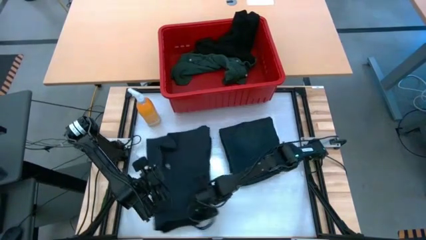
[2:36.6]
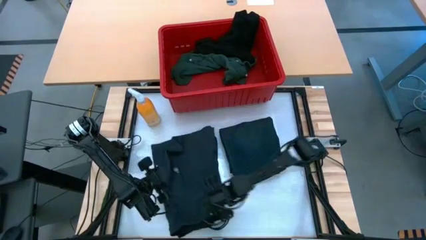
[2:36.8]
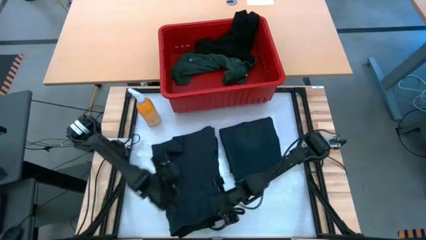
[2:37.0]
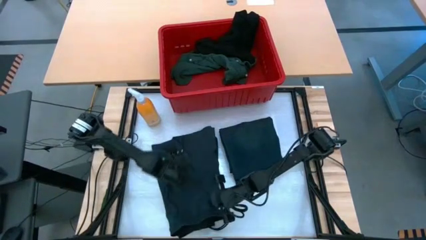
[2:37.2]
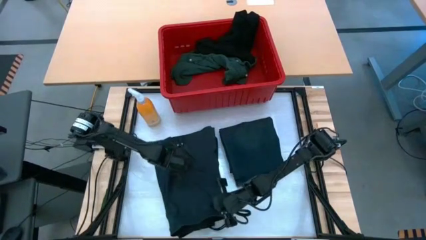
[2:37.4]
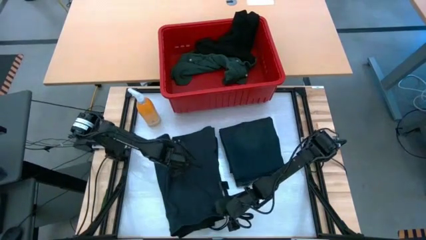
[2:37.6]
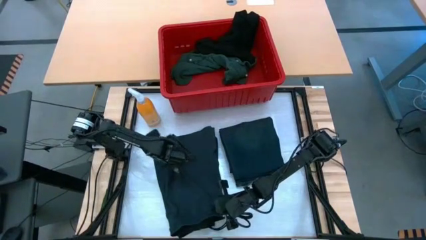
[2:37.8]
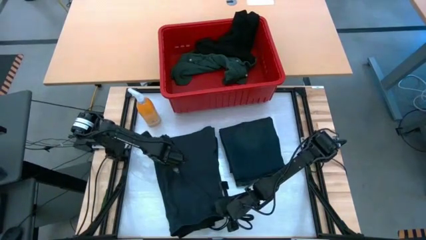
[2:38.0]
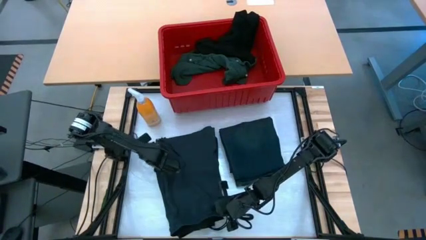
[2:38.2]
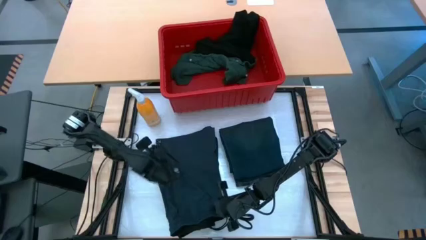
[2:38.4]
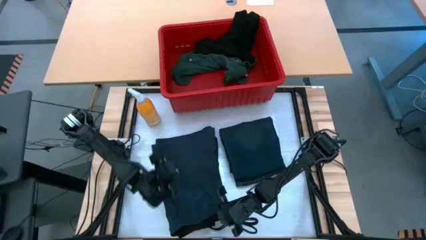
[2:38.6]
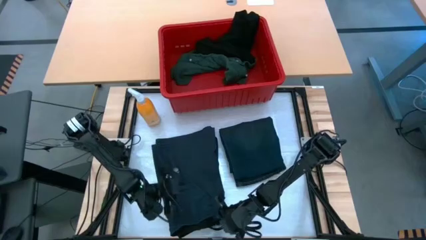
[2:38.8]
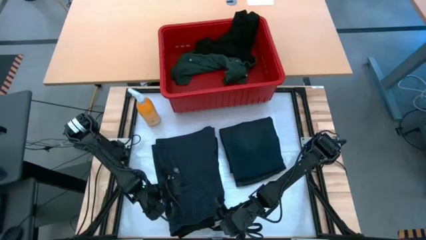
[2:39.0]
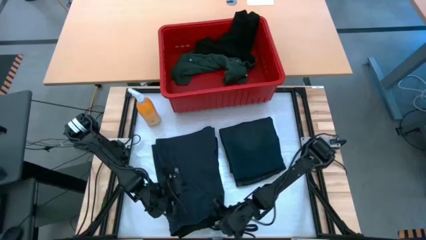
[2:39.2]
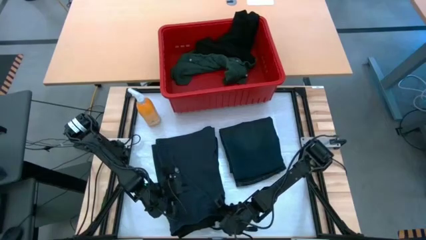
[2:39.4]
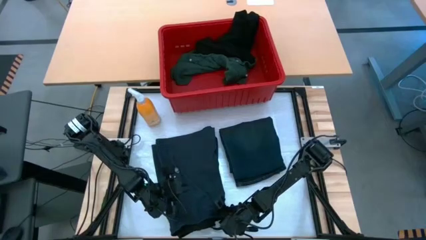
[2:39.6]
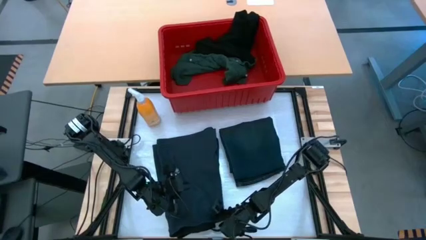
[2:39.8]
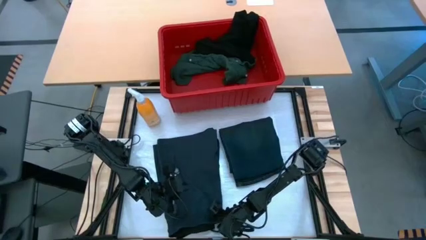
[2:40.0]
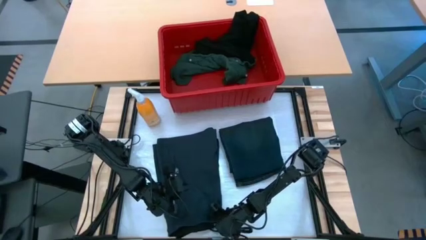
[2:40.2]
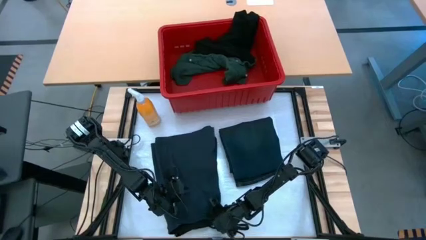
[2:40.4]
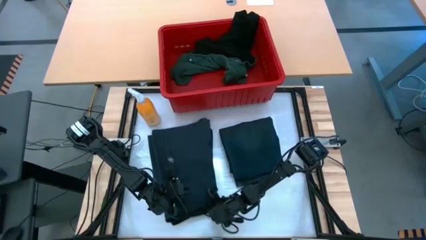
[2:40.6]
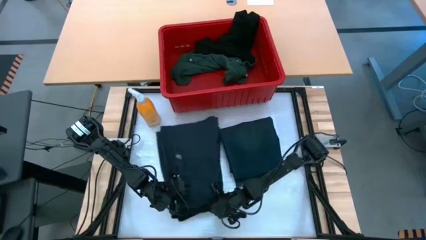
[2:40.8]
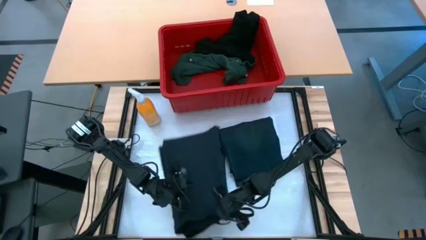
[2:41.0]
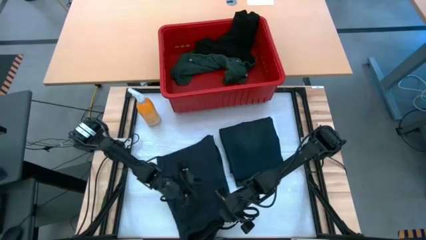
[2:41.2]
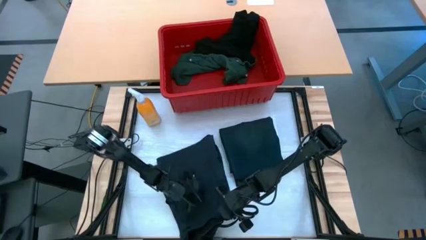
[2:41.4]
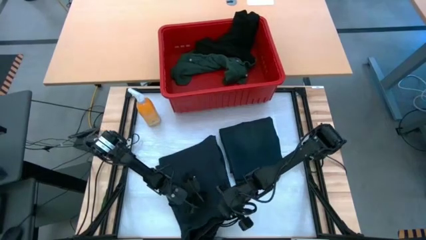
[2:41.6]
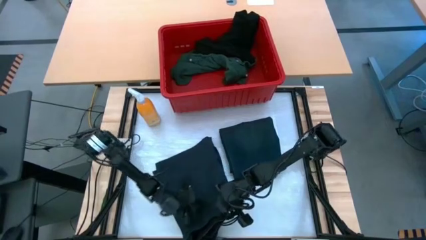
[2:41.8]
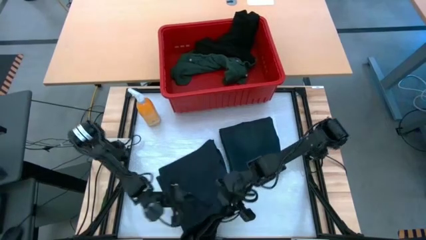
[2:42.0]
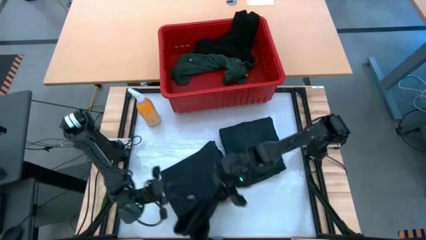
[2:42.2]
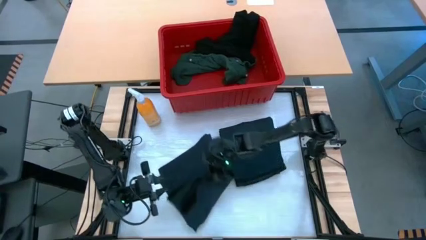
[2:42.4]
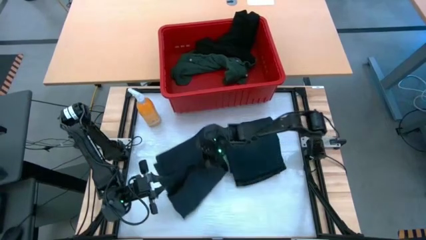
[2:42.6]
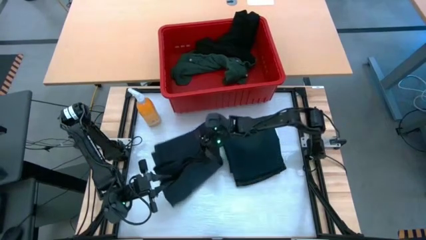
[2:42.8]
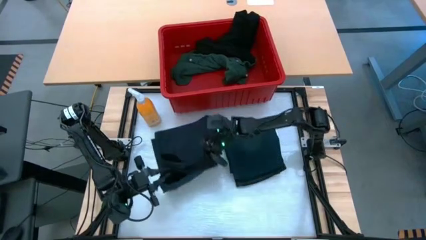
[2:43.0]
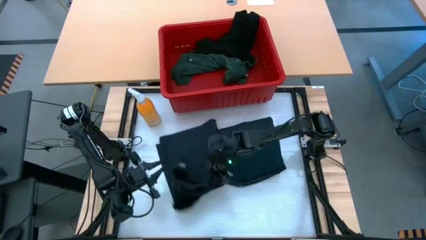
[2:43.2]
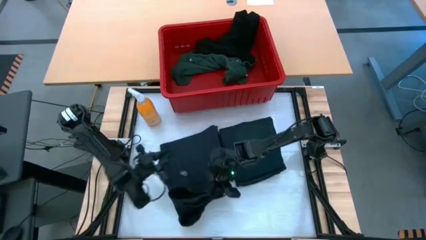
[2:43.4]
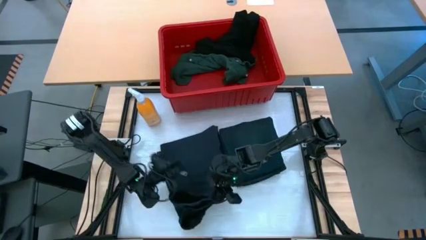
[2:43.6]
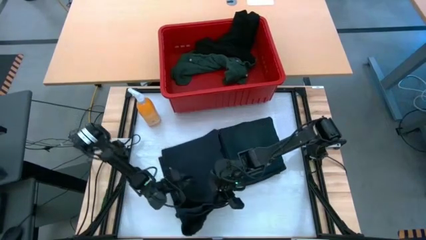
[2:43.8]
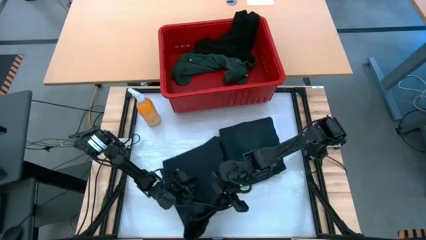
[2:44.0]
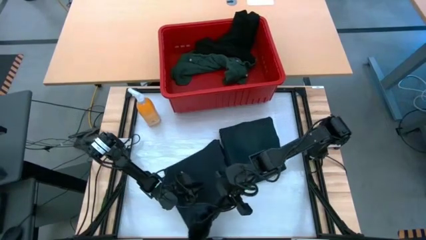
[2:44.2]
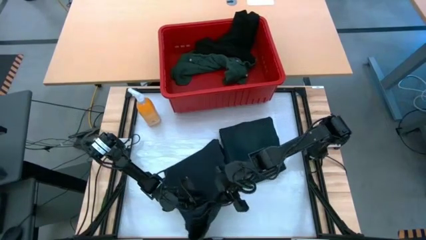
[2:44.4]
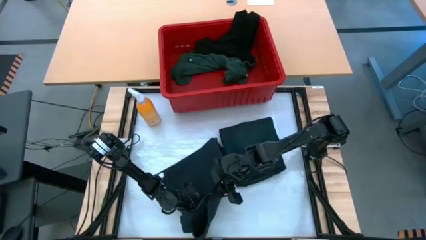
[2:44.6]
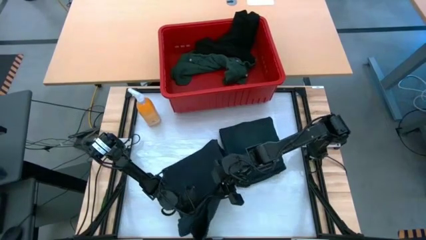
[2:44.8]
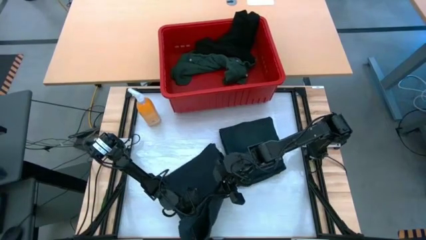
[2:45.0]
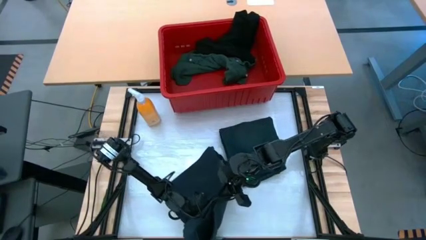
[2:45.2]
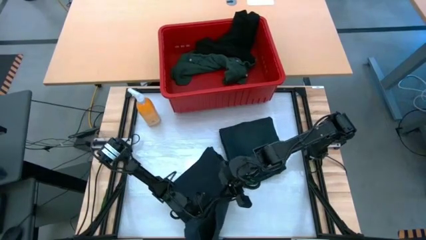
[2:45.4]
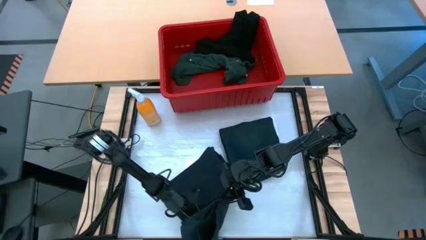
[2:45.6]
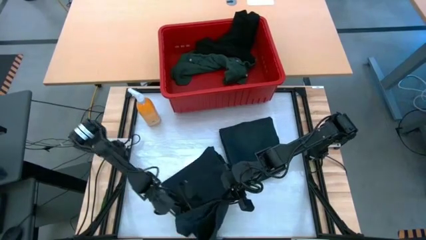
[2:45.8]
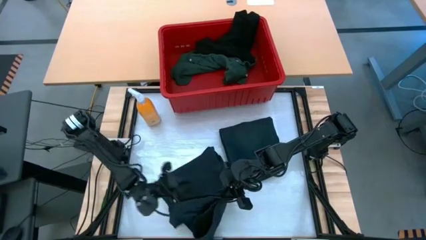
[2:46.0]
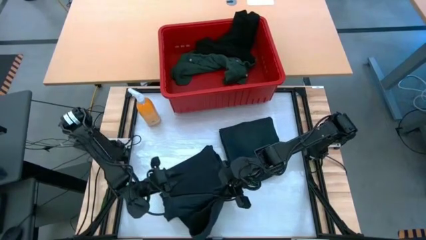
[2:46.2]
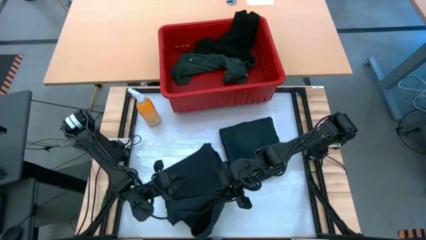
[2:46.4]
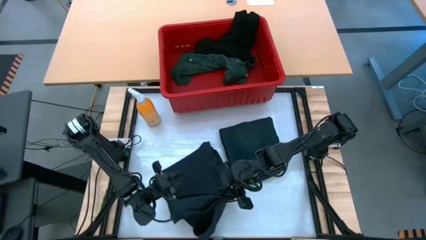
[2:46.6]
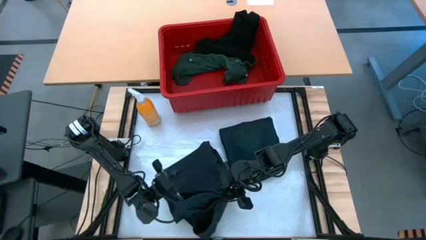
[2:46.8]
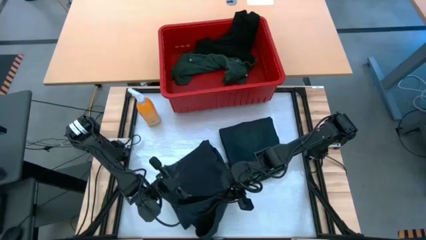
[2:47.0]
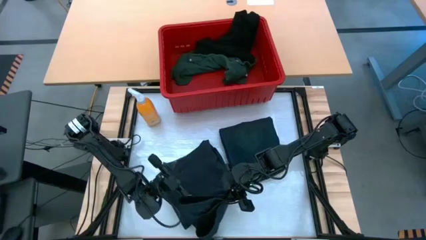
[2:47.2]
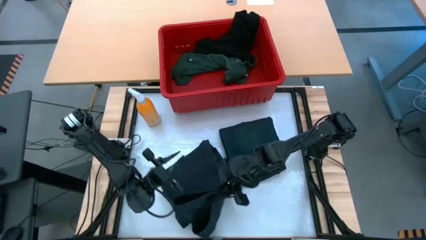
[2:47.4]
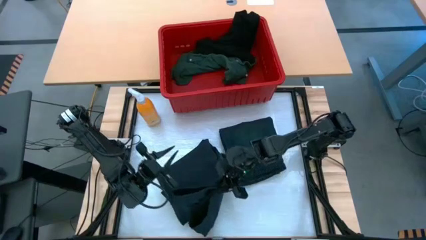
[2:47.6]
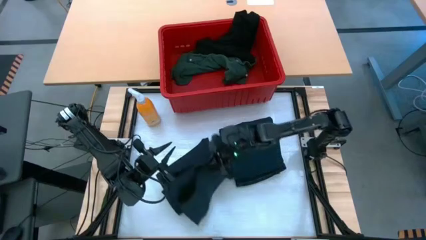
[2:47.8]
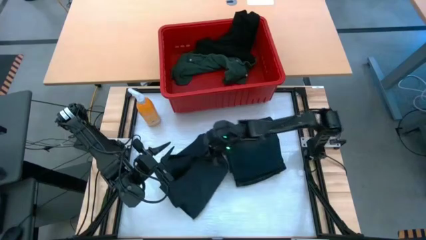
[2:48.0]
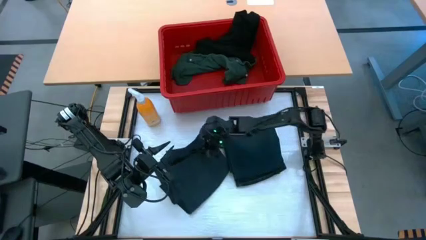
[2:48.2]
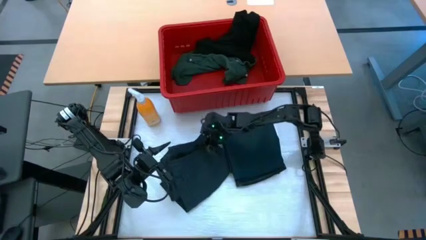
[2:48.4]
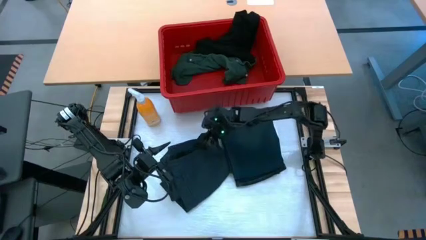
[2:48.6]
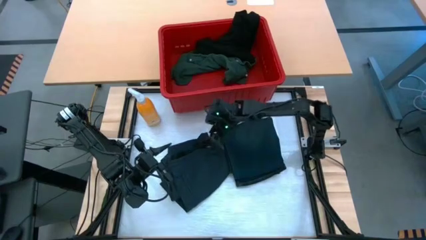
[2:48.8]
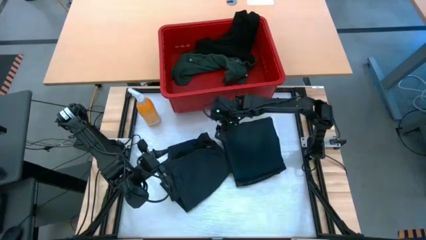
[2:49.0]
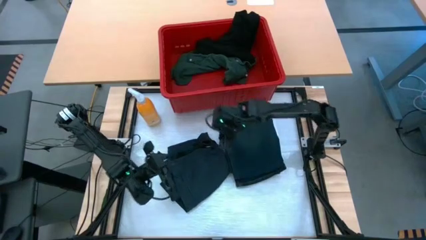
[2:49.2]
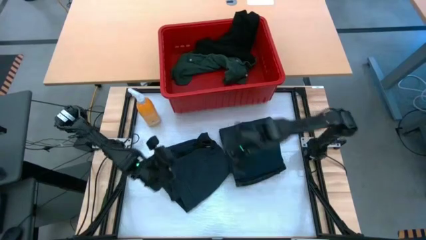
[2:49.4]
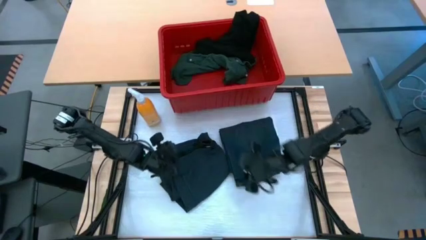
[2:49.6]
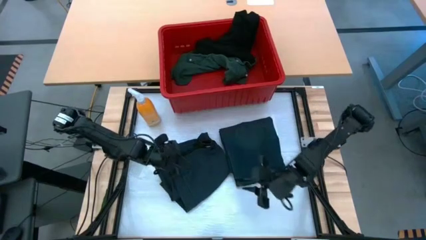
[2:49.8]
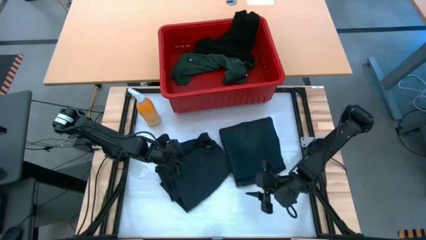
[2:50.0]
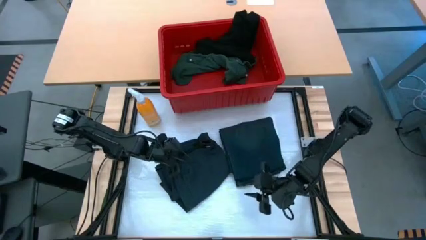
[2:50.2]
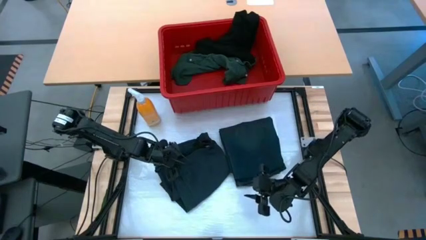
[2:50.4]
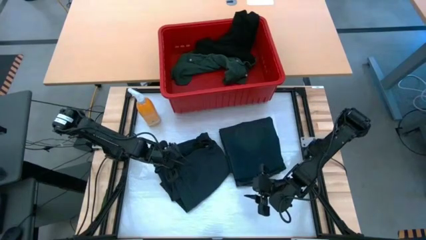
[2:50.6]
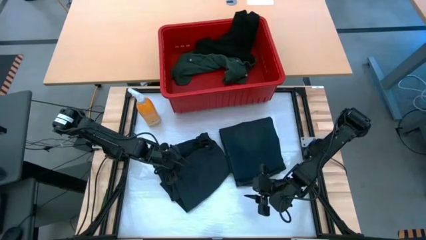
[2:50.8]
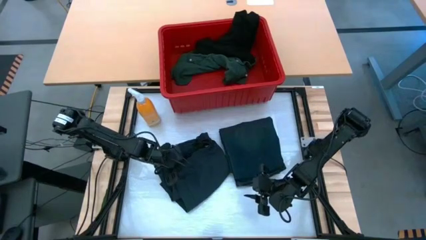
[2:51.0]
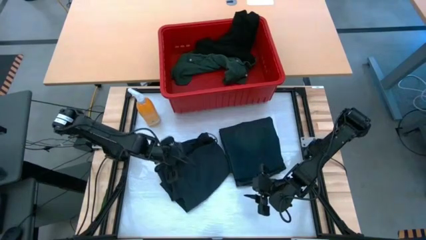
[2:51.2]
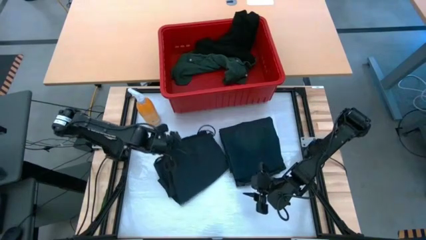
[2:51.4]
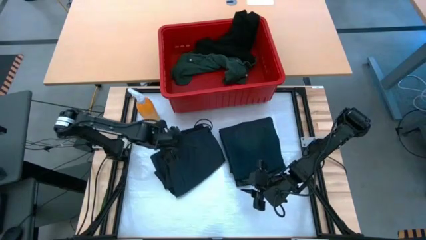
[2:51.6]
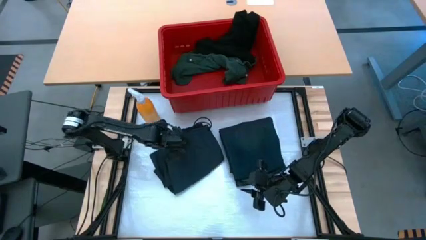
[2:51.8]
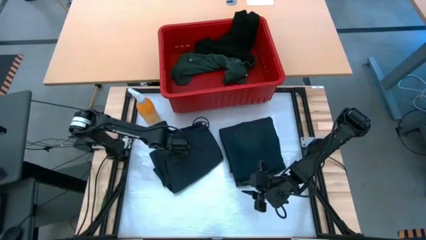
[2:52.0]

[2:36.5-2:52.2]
Task: Fold Laundry from Bin
Fold the dark blue shorts
